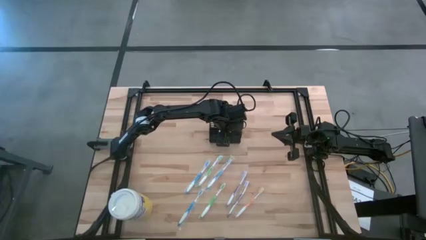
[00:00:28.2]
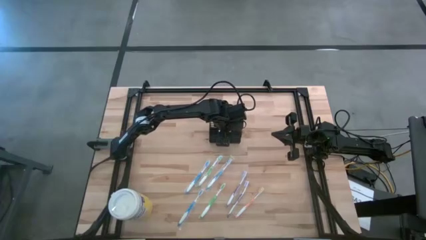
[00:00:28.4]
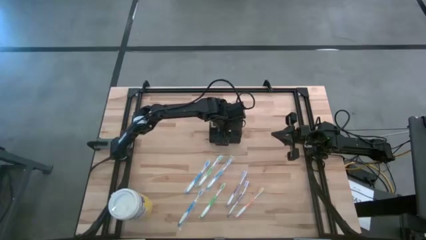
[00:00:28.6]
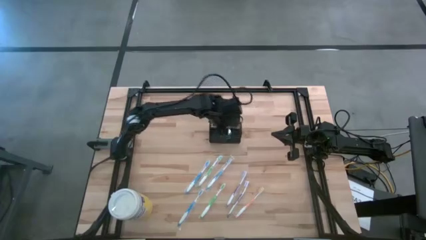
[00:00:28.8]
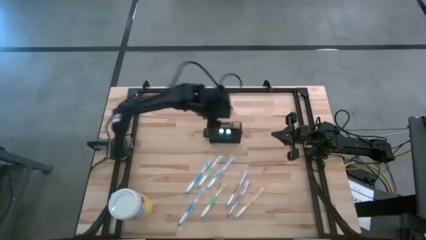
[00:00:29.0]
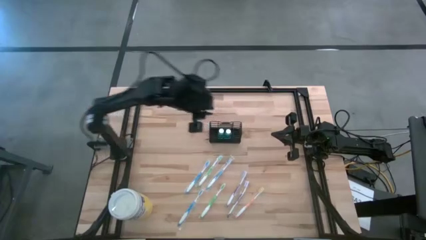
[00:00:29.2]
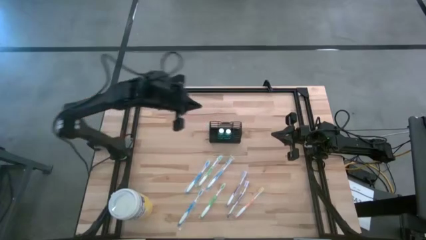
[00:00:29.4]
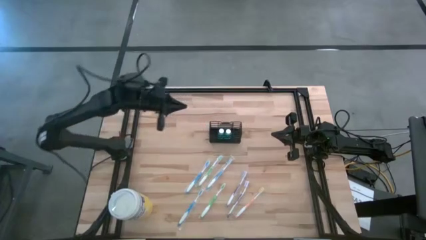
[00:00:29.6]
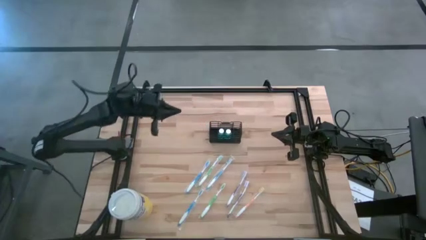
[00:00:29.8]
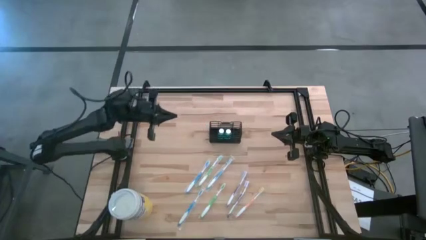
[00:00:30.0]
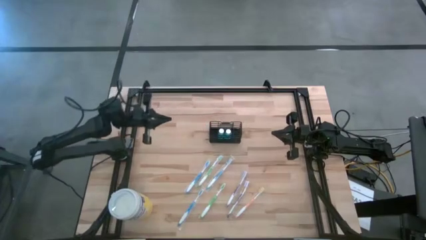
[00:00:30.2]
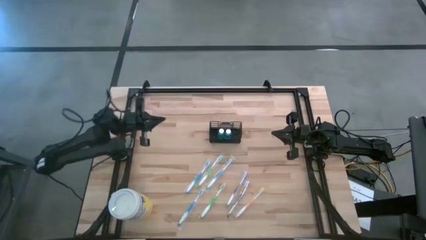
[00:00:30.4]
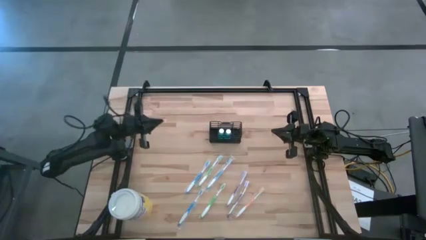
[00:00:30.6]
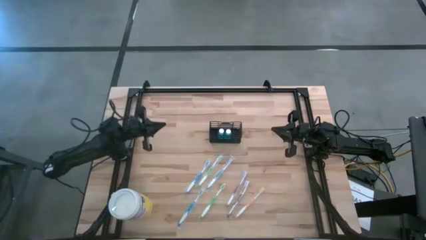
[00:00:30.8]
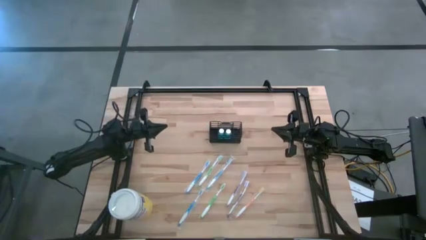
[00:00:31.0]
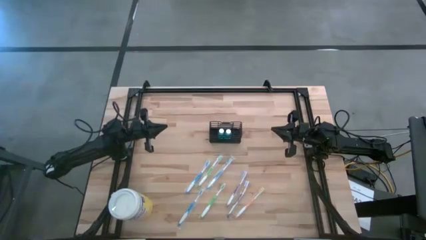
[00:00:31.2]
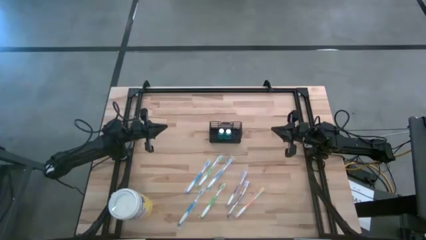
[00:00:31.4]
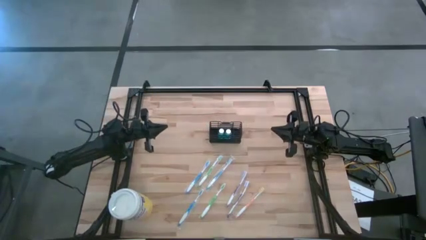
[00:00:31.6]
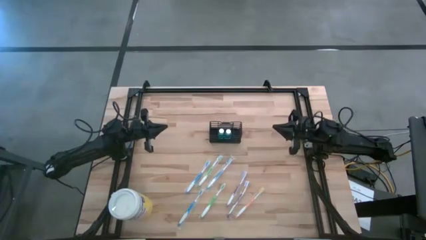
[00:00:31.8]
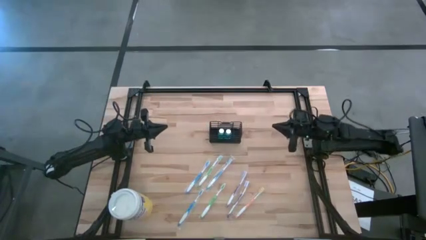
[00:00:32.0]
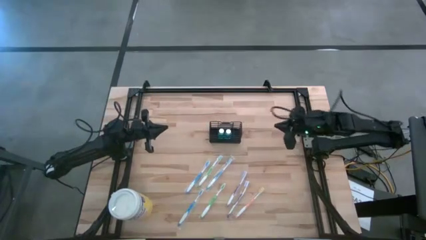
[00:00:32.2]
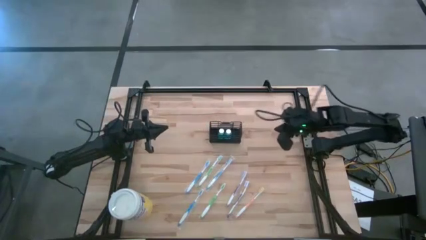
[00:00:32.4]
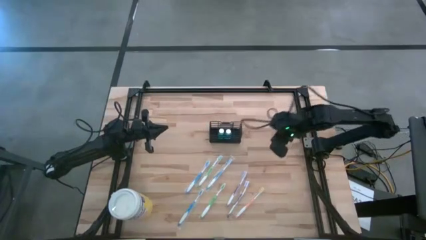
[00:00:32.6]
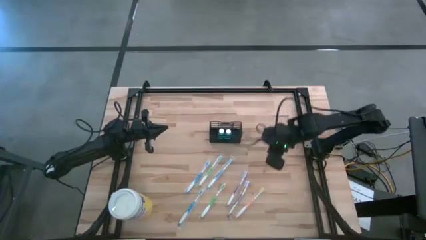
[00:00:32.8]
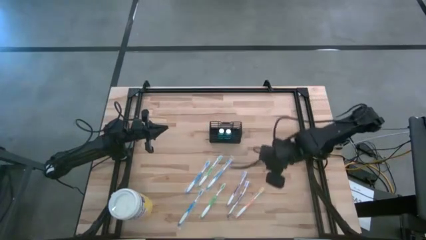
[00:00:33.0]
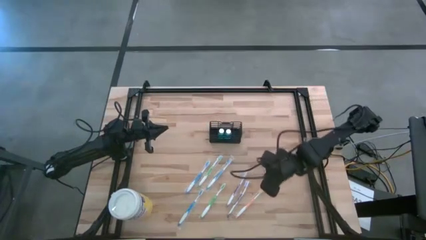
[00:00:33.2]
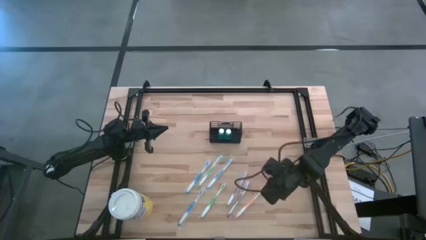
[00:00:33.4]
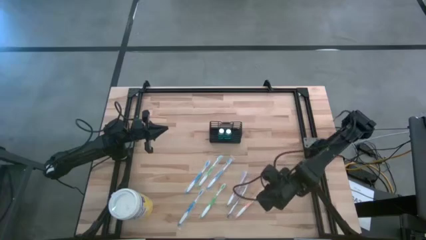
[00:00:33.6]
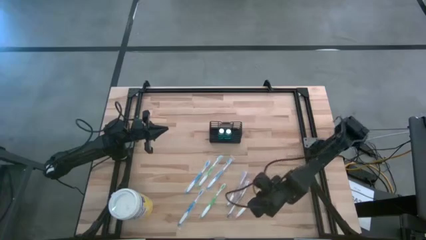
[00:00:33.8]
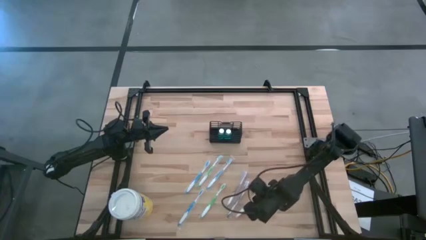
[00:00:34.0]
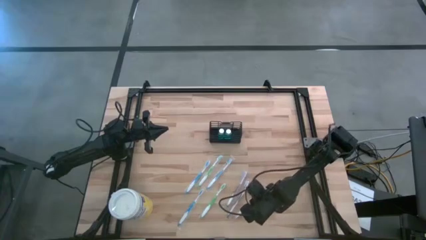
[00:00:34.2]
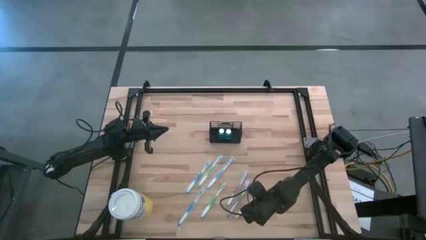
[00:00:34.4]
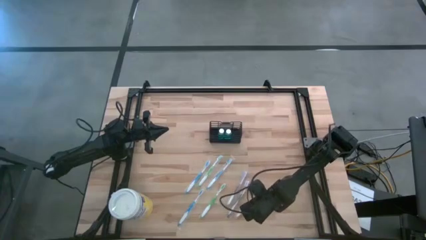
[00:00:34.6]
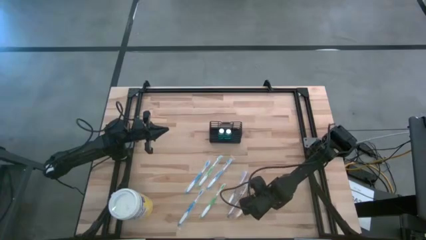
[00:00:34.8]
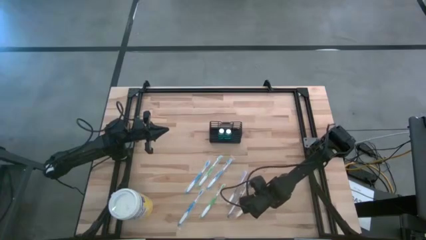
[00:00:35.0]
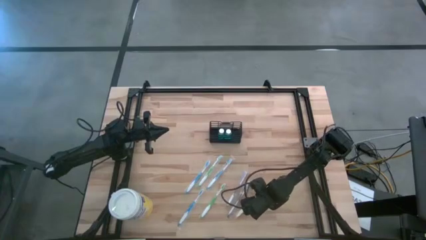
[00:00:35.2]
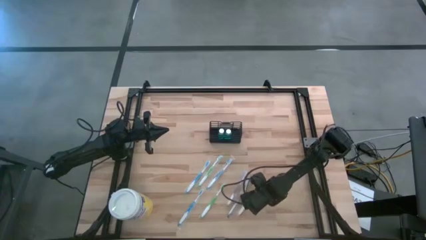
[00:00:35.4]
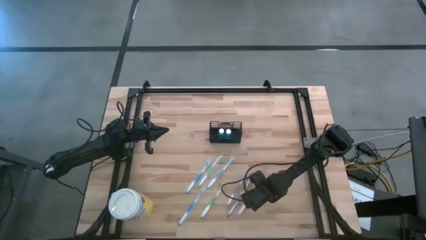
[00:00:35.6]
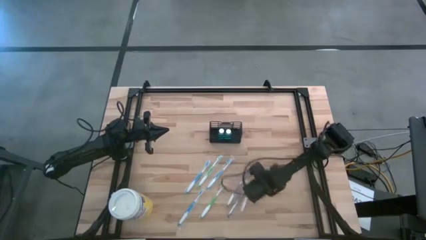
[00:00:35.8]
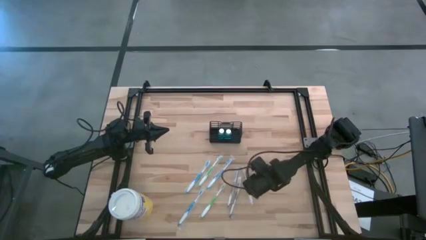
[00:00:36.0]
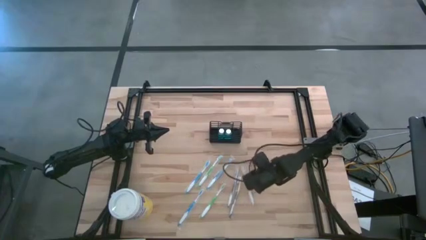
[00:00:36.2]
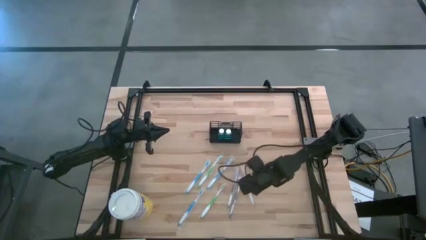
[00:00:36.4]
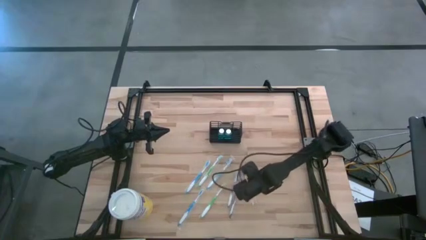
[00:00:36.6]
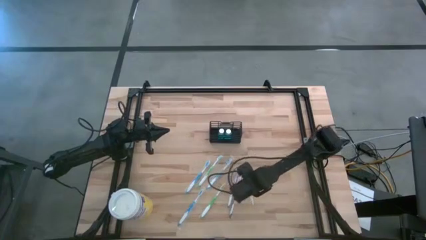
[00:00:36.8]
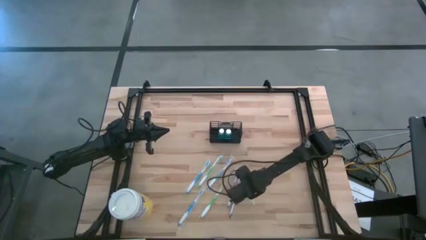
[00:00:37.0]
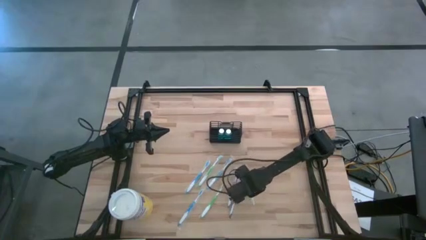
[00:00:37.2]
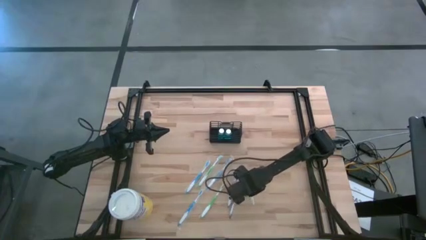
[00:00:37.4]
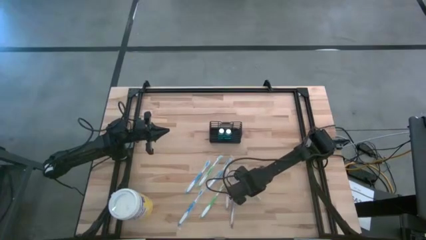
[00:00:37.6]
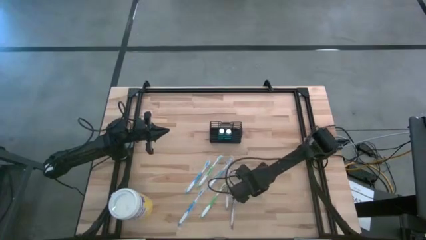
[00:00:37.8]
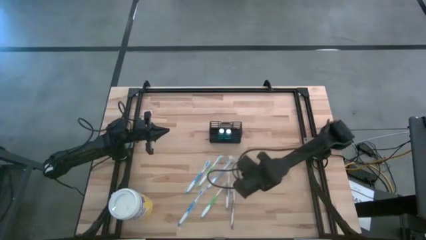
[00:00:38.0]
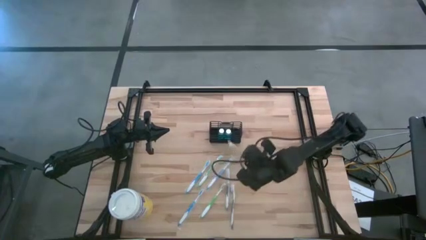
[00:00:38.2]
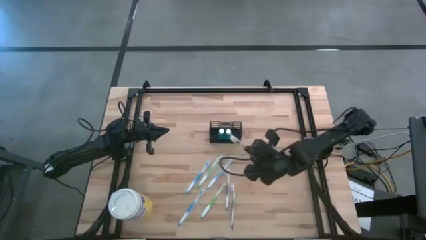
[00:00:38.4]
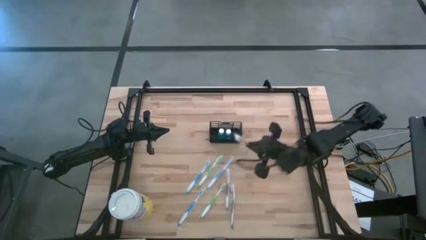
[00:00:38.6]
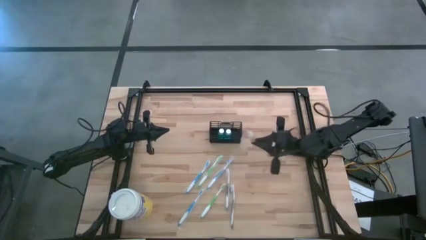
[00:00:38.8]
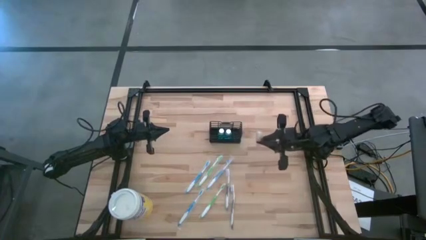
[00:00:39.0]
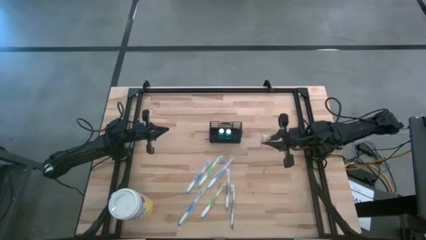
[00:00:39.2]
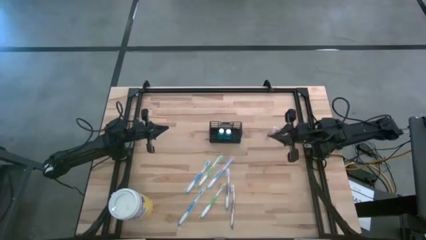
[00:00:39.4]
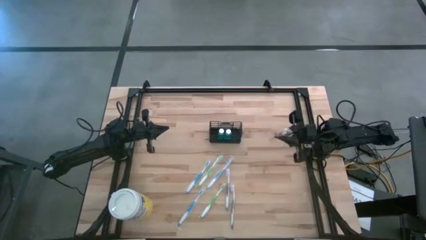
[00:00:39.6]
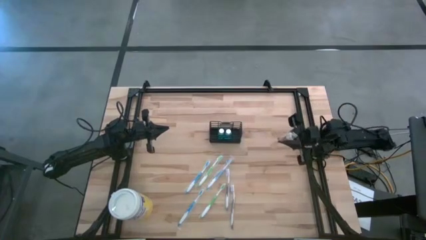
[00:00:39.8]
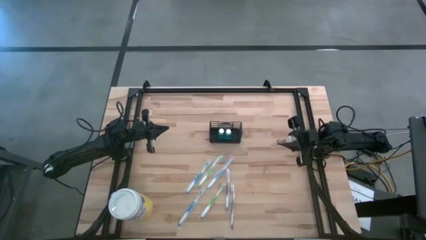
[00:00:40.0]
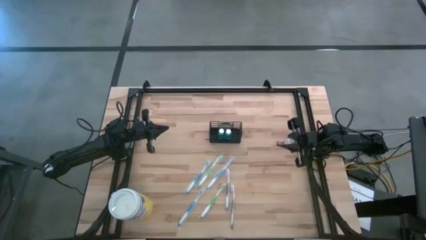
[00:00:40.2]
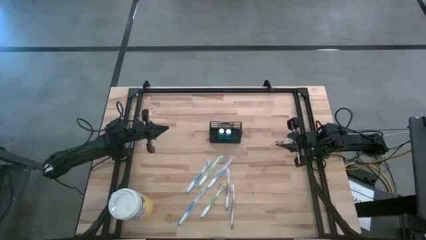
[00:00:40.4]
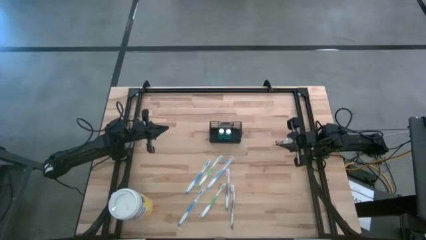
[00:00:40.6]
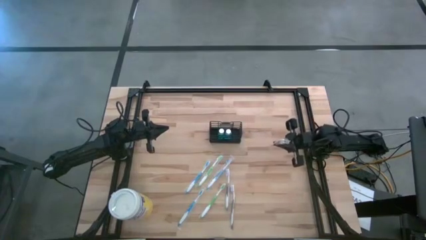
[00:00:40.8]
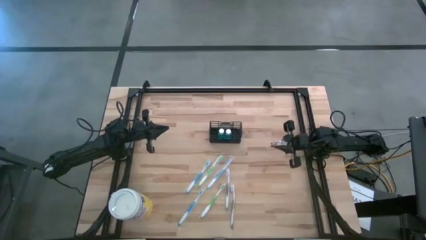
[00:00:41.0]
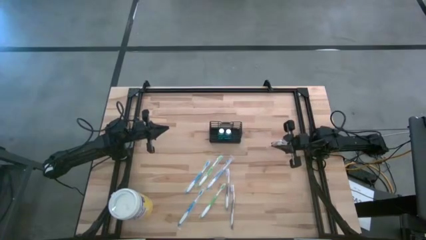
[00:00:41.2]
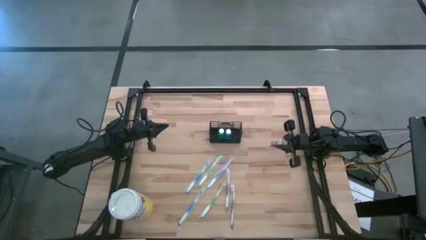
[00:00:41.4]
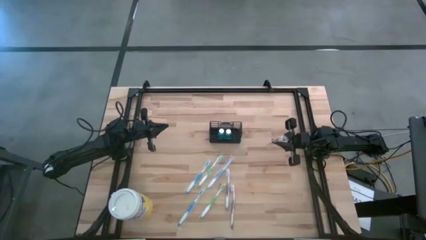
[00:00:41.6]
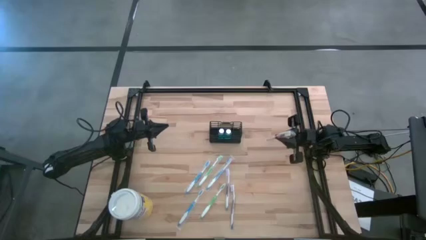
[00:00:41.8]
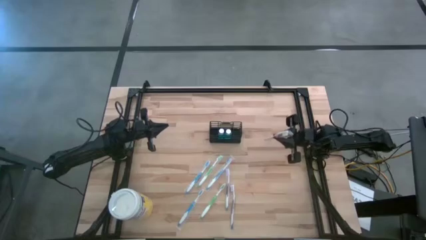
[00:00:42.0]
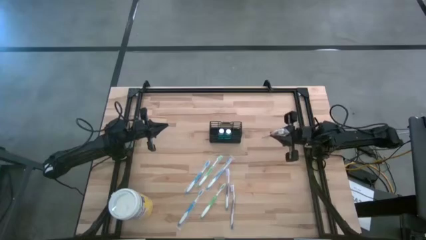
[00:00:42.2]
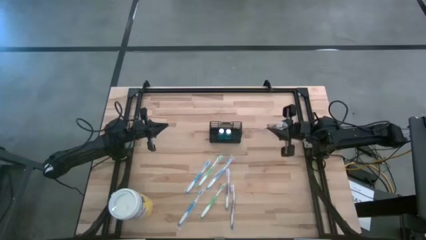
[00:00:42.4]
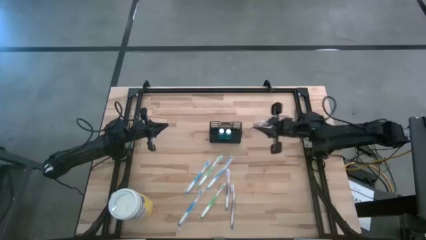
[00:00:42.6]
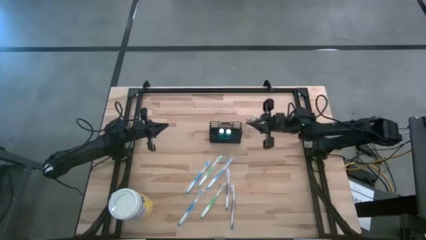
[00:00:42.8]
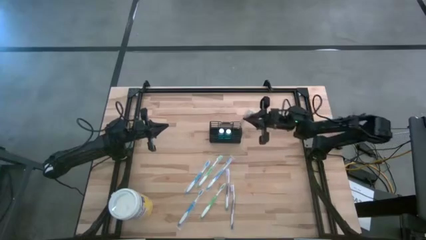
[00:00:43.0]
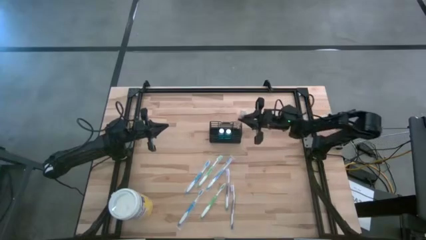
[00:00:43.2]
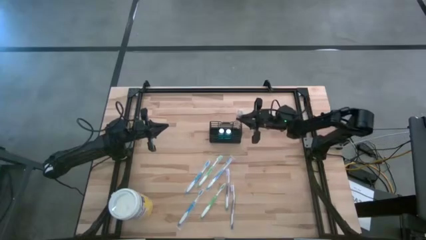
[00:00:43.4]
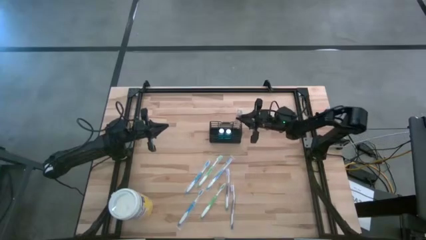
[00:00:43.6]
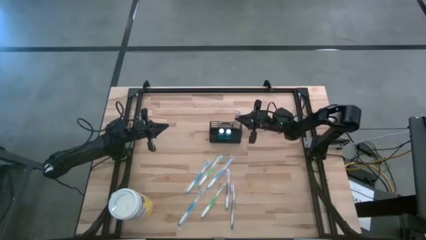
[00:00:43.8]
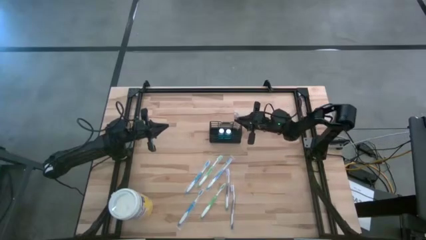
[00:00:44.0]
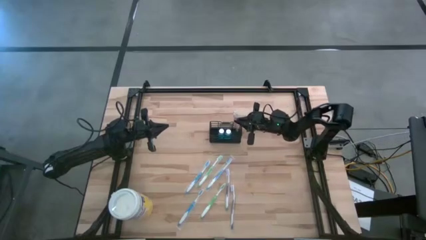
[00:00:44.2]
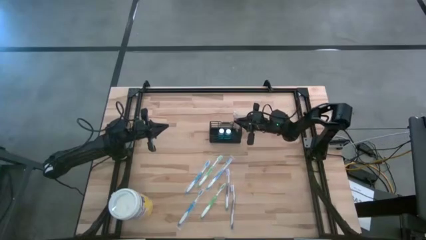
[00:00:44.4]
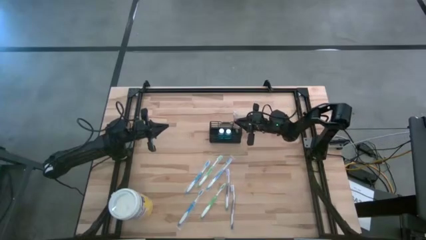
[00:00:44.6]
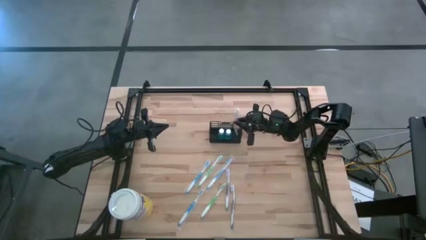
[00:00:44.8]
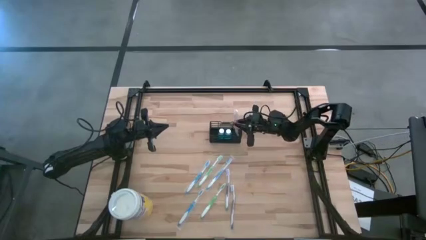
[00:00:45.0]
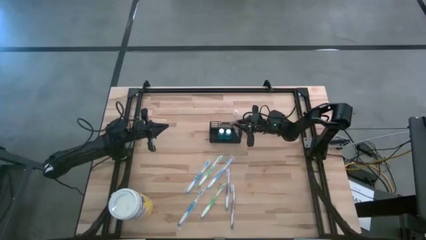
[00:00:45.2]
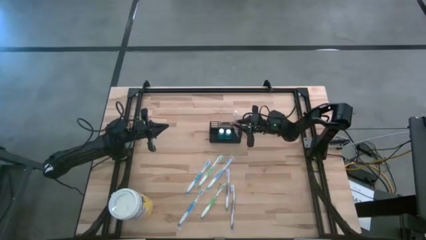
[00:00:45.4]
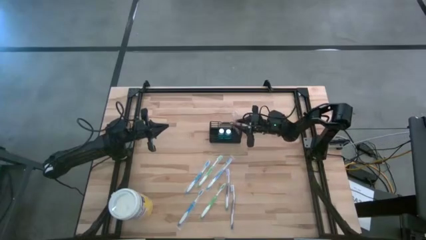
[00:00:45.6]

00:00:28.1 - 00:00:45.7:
Task: Pick & Place toothbrushing station
Put the orange toothbrush into the wire organizer
